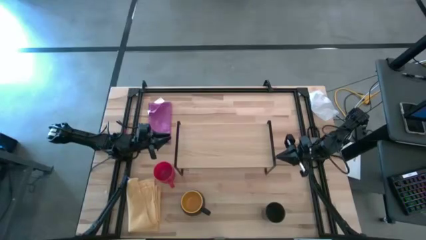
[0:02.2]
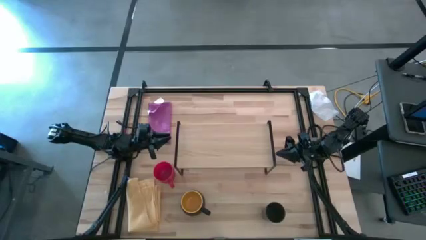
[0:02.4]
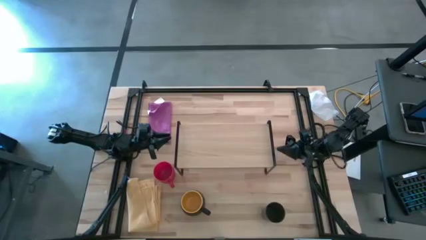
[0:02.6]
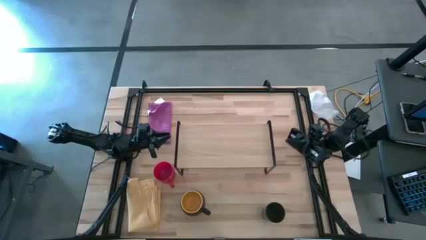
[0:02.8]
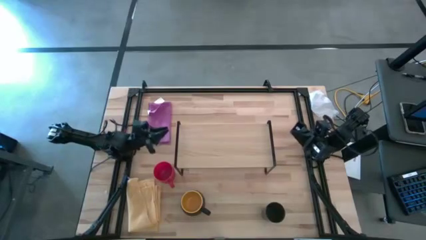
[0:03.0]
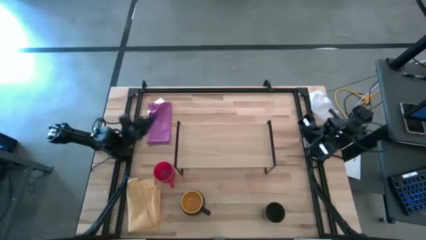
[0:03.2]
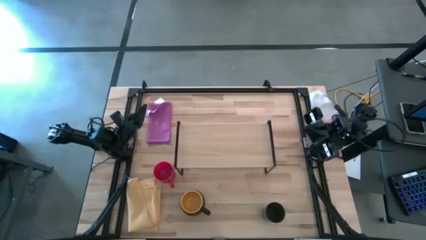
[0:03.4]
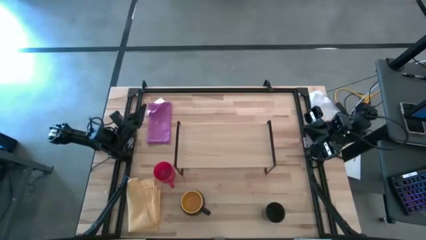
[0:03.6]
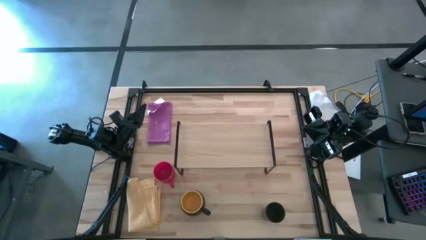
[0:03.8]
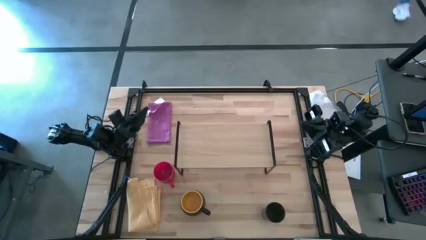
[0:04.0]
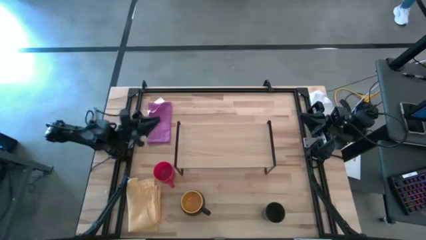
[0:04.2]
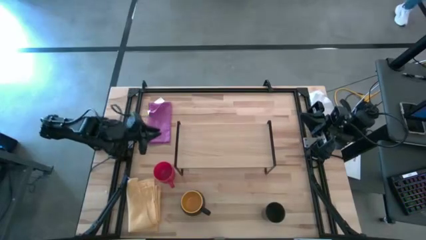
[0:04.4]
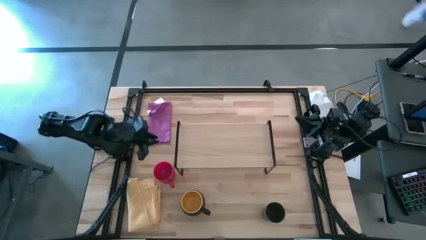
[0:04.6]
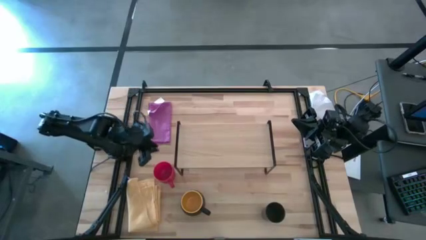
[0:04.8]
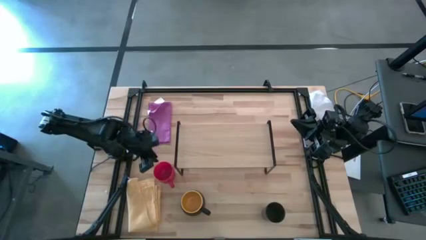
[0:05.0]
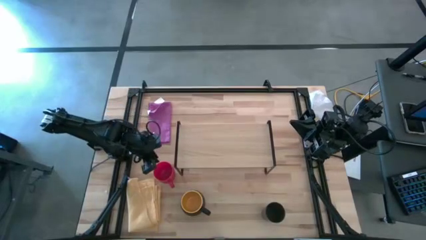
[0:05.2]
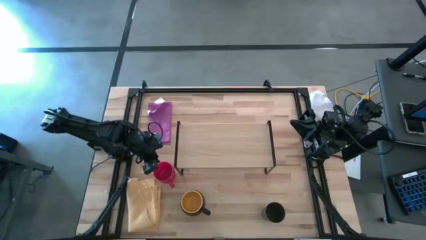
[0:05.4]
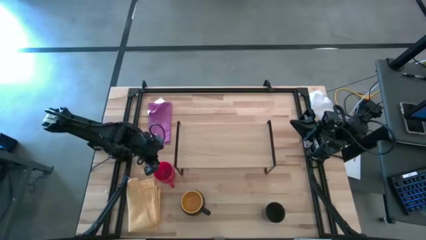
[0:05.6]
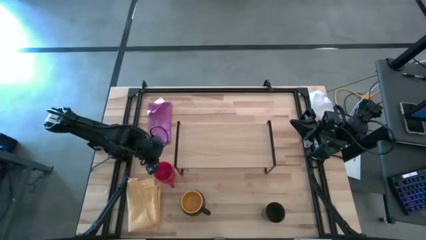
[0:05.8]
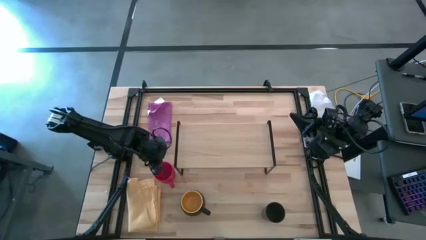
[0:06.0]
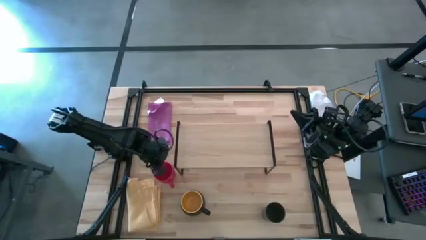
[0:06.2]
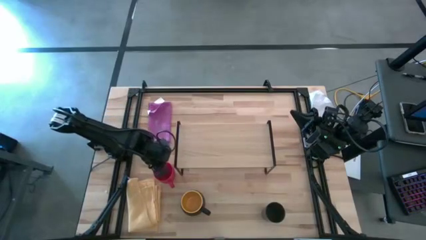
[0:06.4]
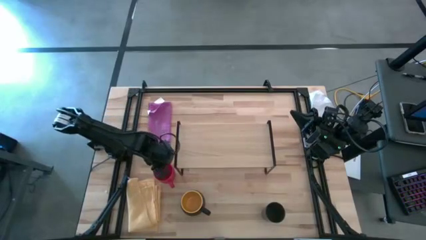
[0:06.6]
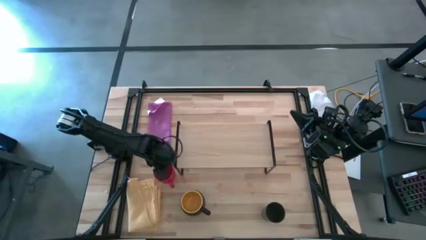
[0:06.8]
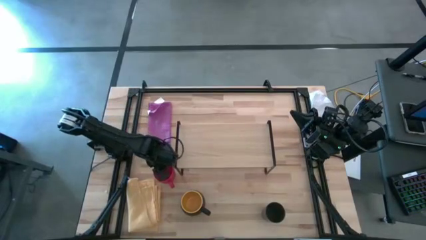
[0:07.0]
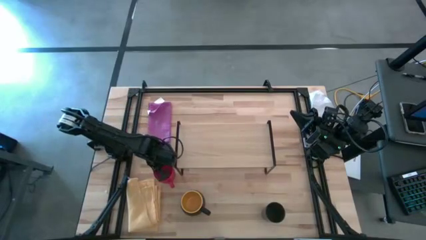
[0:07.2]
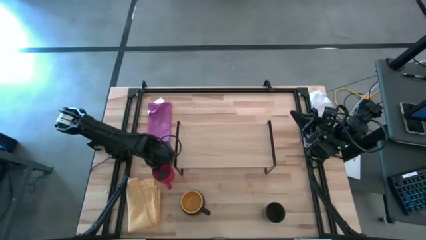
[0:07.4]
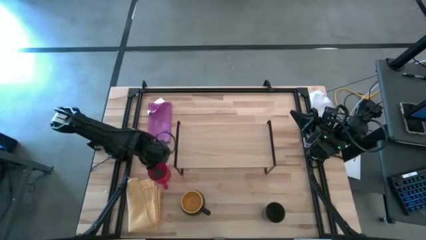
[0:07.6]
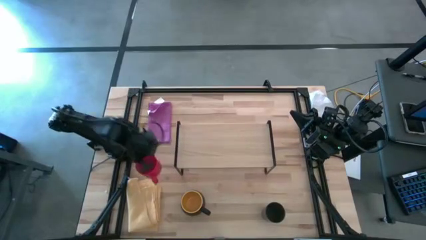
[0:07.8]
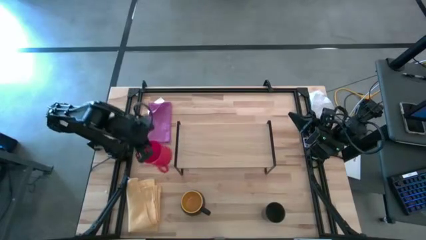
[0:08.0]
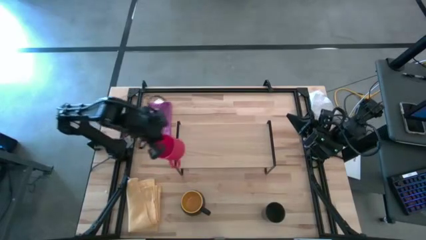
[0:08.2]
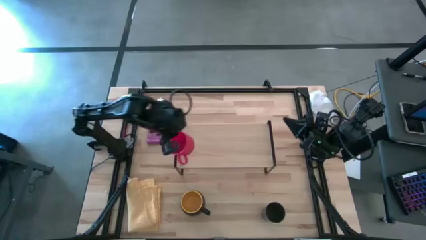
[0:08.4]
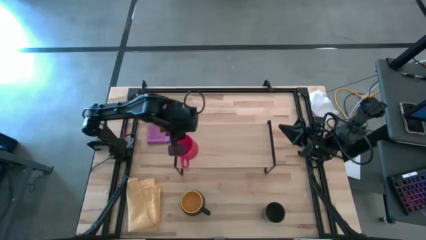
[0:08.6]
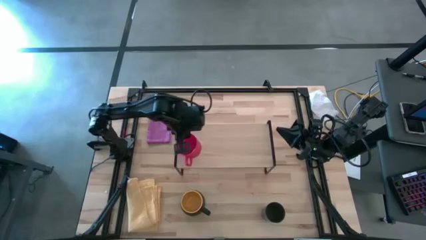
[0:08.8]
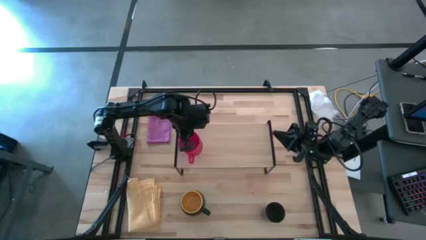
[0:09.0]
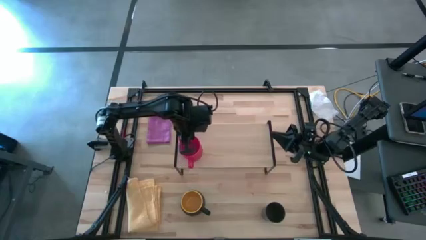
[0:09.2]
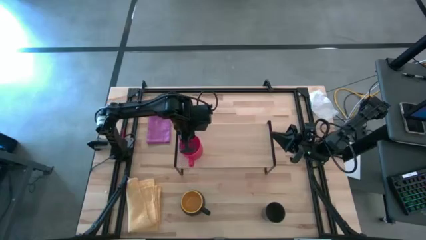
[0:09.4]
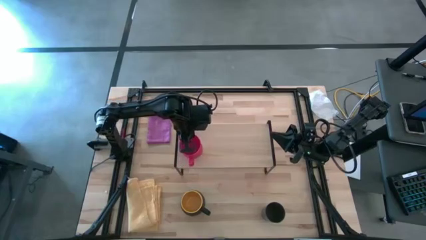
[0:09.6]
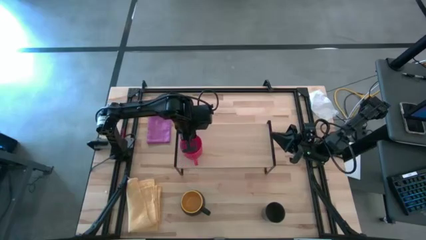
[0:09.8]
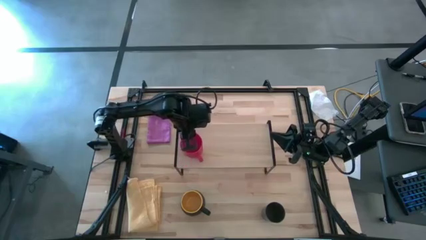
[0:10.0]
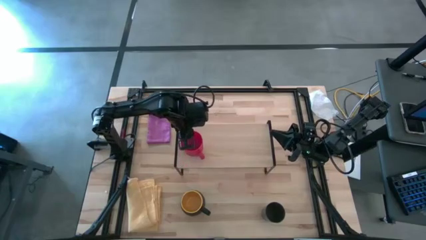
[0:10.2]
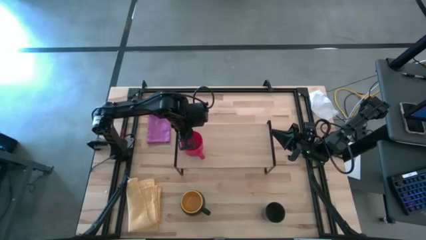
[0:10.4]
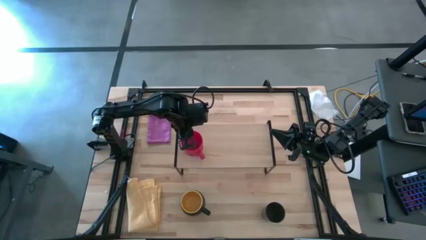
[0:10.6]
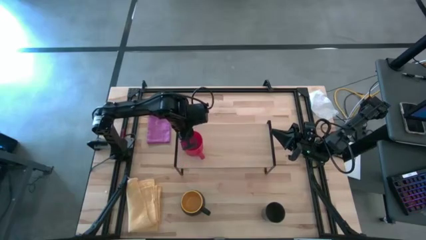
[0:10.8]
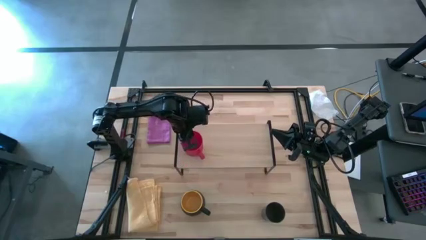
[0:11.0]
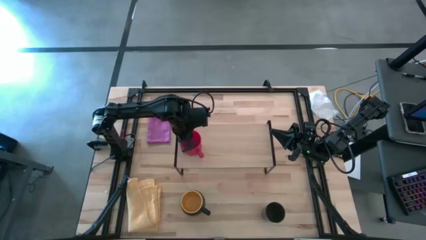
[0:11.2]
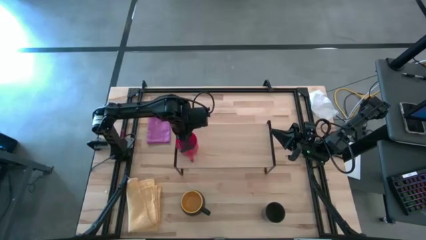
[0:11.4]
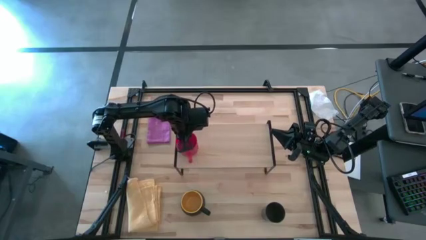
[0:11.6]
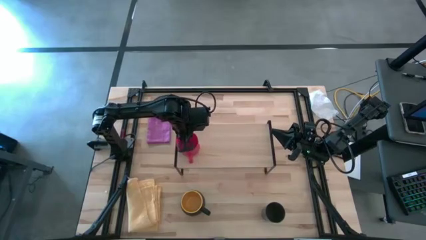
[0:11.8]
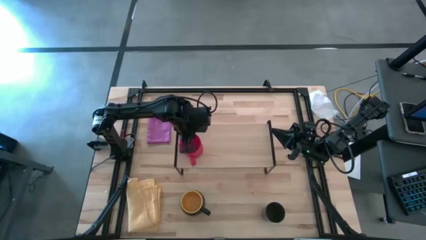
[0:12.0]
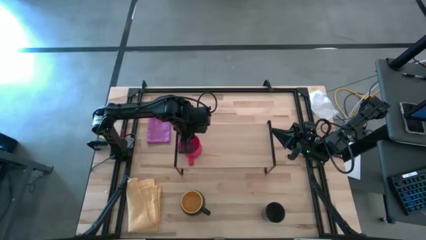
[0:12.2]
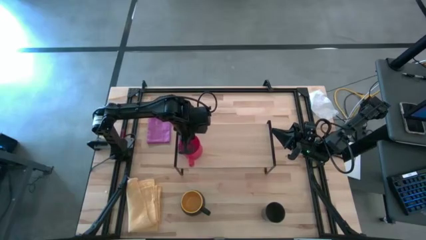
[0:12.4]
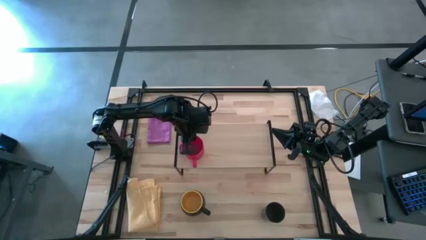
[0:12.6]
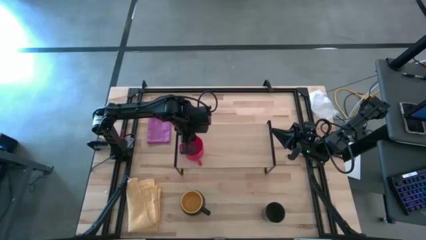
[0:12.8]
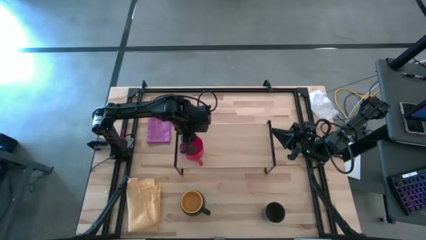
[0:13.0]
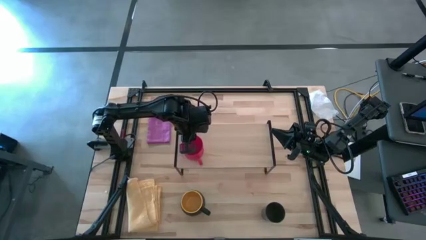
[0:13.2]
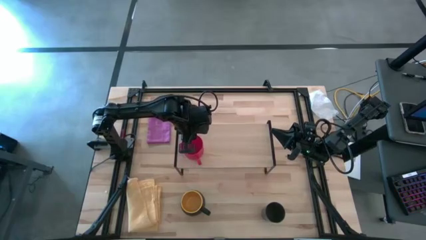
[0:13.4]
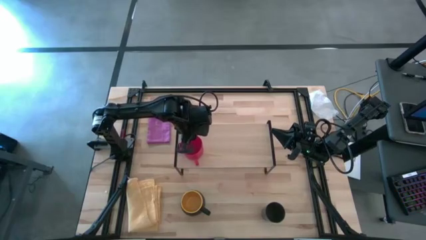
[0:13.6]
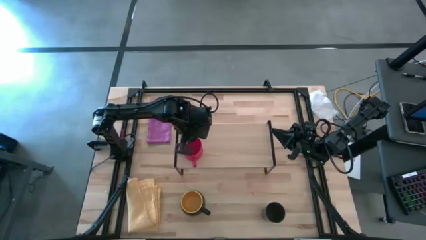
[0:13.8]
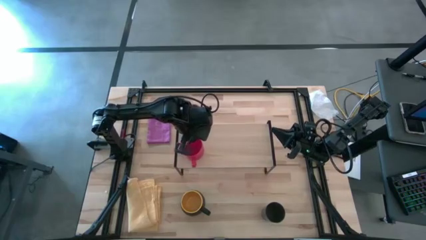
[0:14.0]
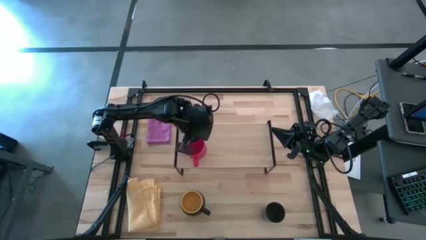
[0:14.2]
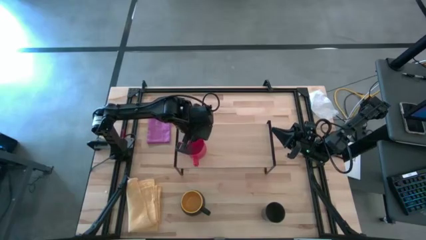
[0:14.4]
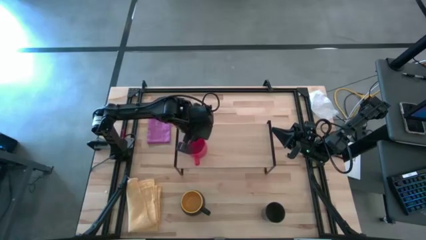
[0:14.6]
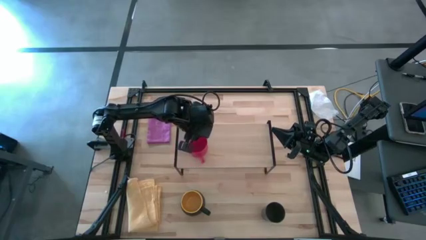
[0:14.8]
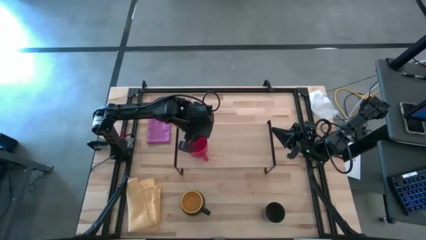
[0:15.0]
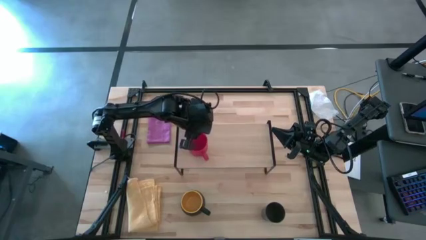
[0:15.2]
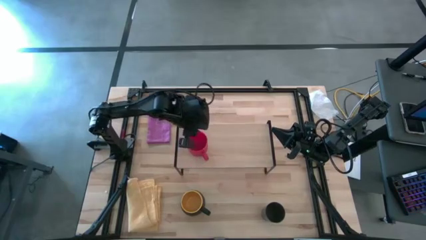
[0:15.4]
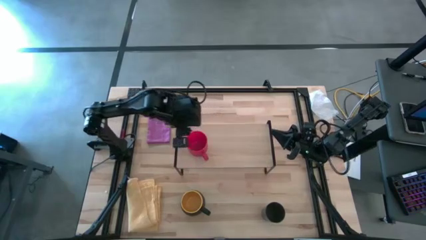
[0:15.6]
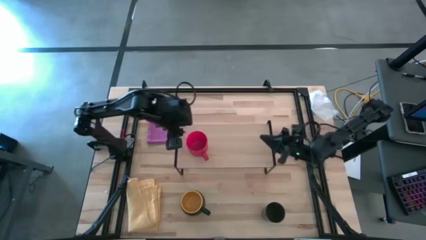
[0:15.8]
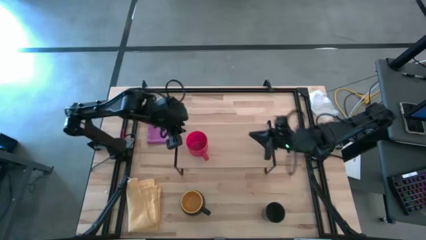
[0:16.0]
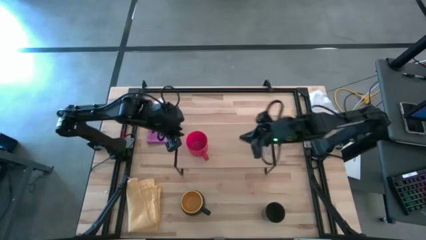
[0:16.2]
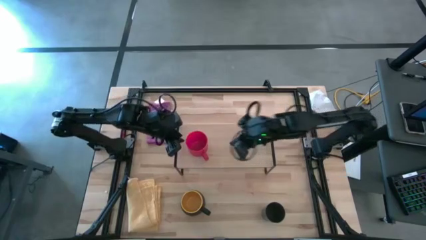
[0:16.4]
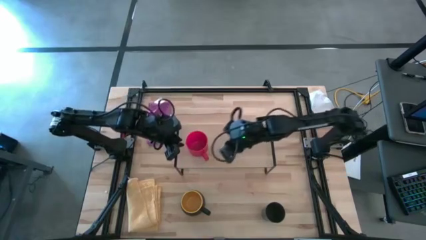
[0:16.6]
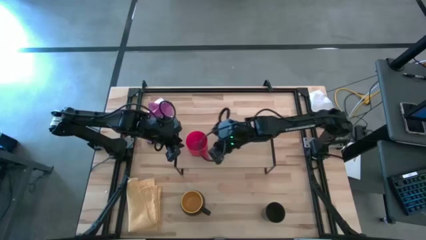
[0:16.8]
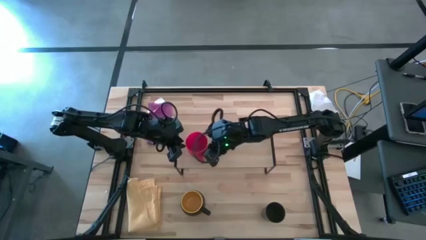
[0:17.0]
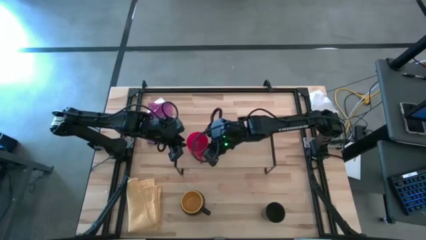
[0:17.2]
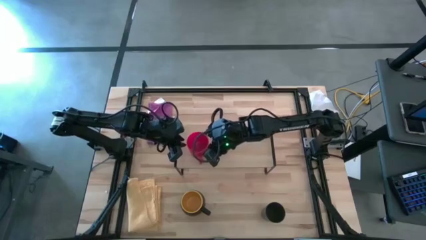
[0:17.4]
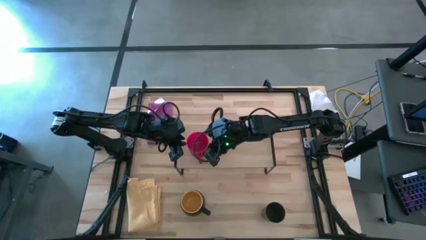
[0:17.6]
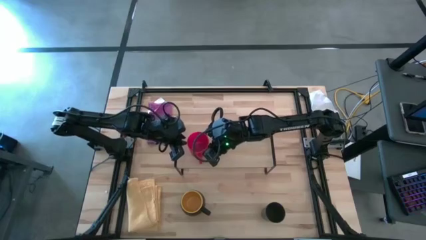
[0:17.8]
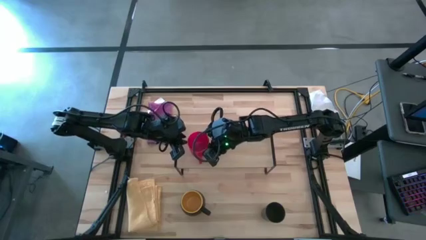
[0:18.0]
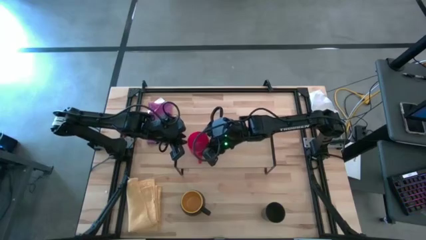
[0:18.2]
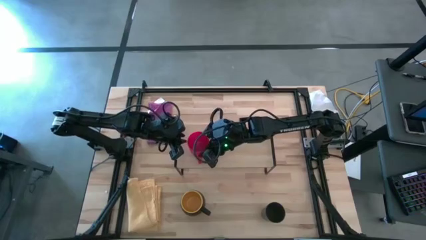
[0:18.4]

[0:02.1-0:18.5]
Task: Stack small to large cups/mugs on shelf
Put the red mug on the shelf
